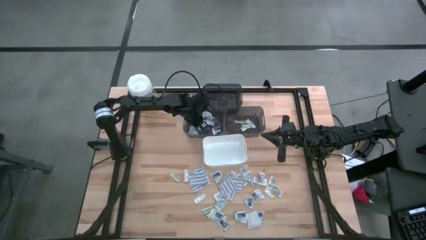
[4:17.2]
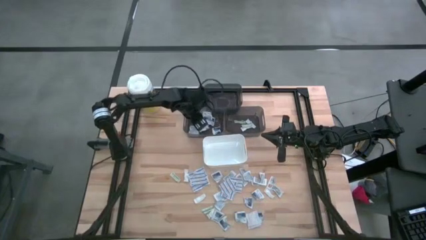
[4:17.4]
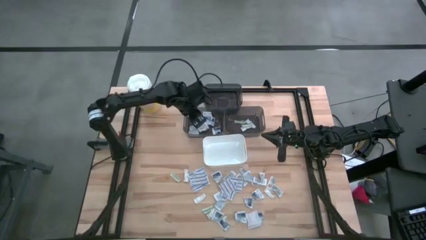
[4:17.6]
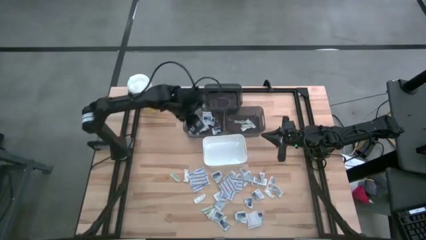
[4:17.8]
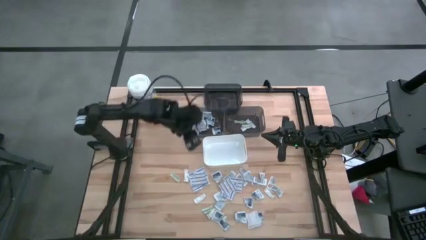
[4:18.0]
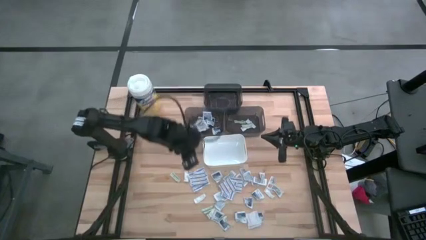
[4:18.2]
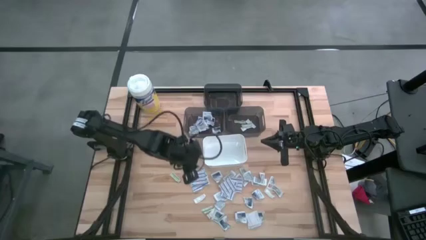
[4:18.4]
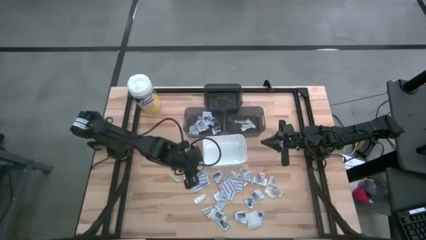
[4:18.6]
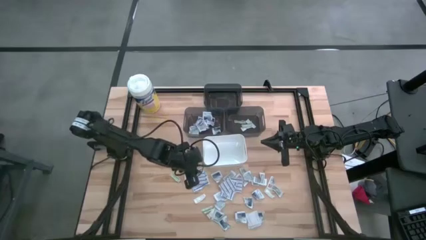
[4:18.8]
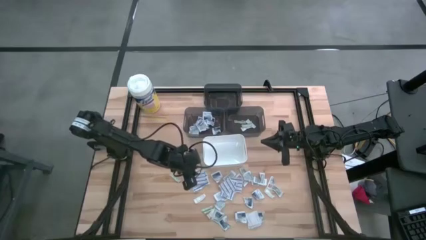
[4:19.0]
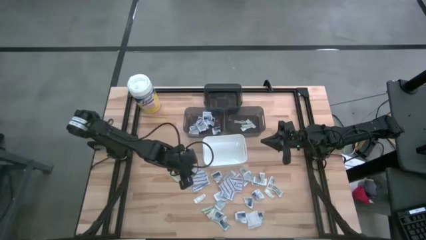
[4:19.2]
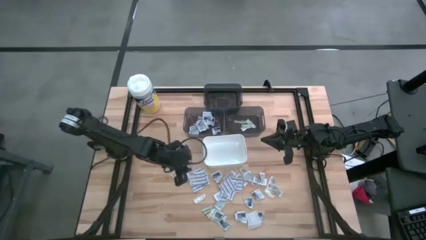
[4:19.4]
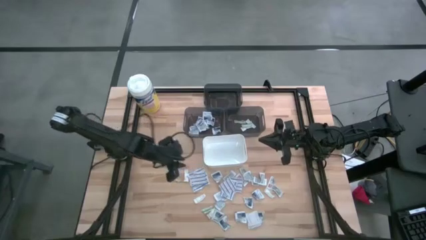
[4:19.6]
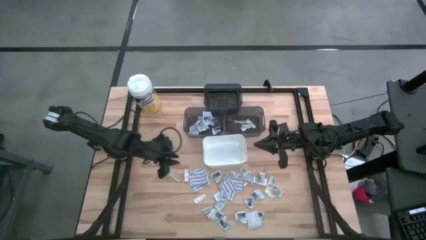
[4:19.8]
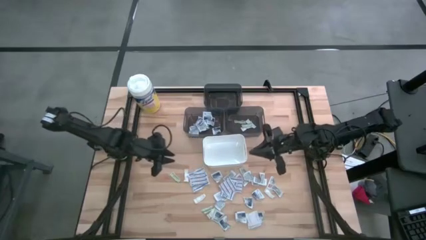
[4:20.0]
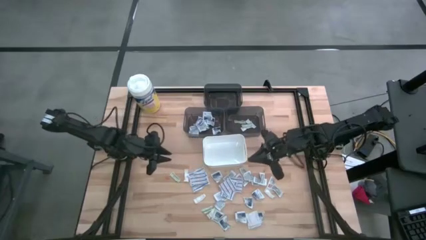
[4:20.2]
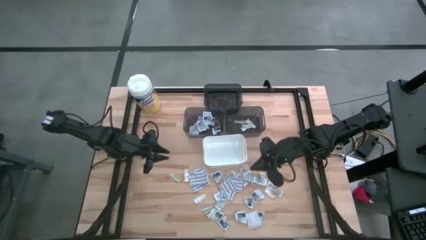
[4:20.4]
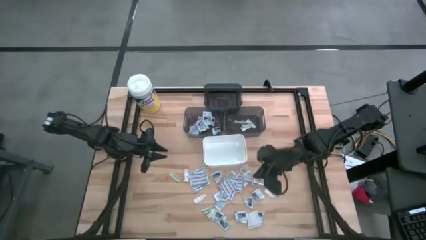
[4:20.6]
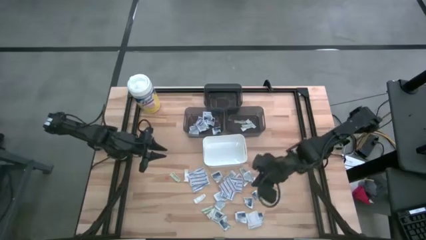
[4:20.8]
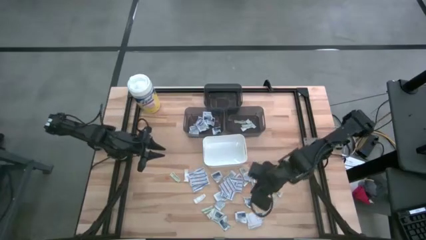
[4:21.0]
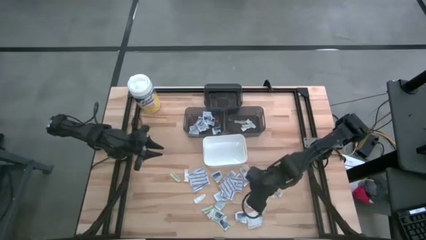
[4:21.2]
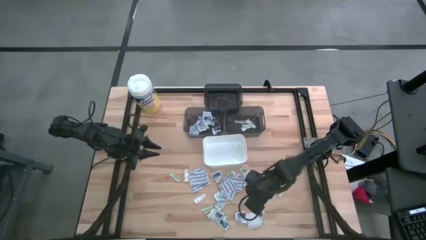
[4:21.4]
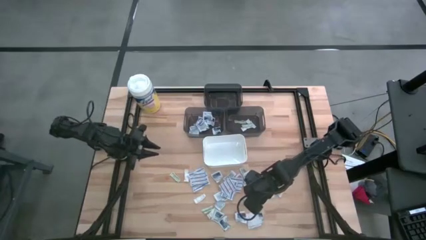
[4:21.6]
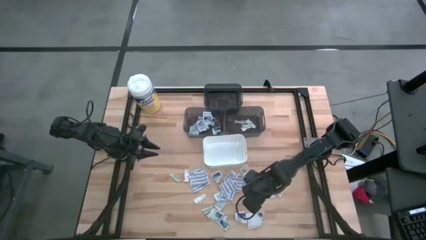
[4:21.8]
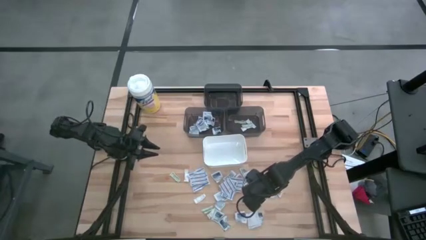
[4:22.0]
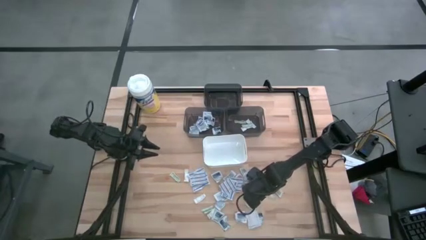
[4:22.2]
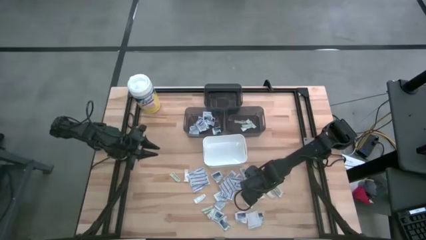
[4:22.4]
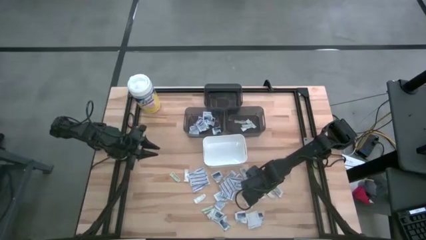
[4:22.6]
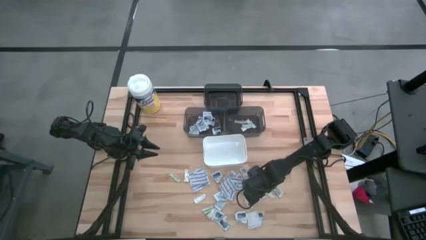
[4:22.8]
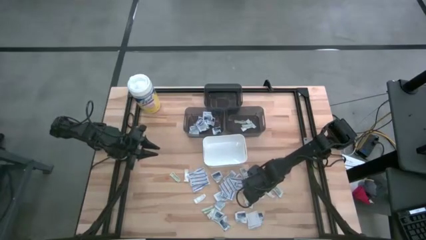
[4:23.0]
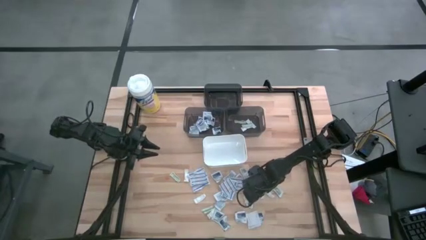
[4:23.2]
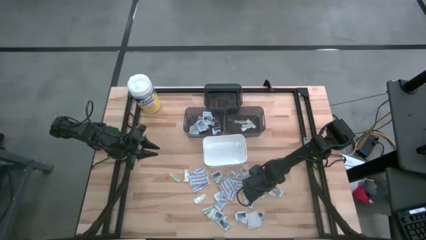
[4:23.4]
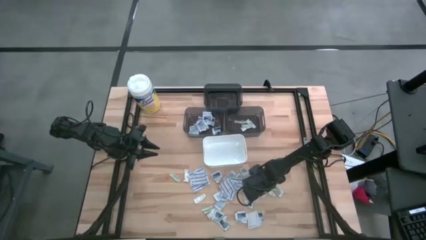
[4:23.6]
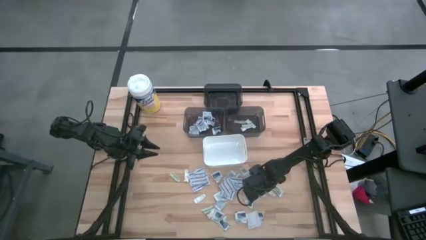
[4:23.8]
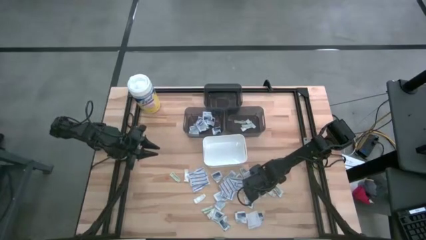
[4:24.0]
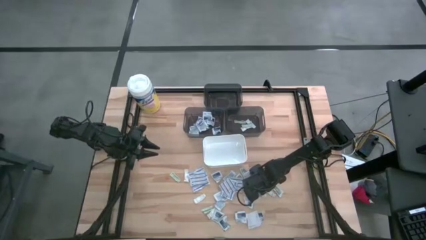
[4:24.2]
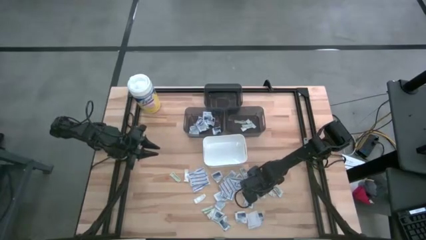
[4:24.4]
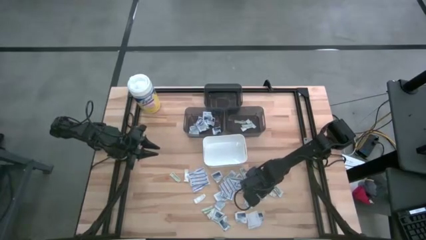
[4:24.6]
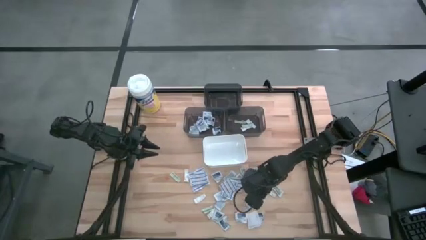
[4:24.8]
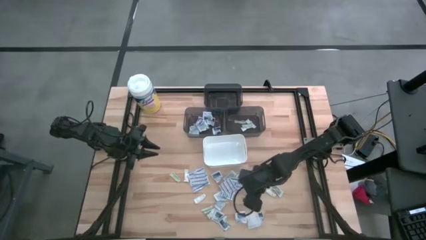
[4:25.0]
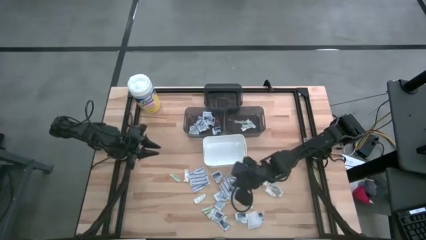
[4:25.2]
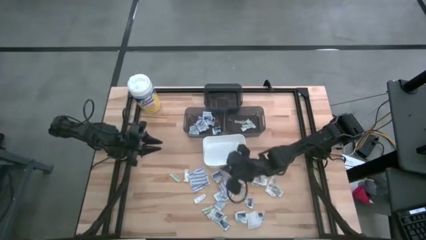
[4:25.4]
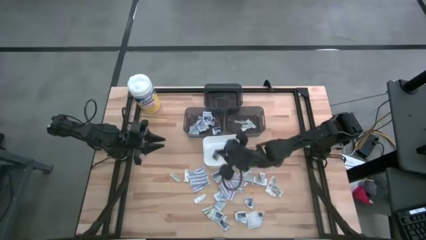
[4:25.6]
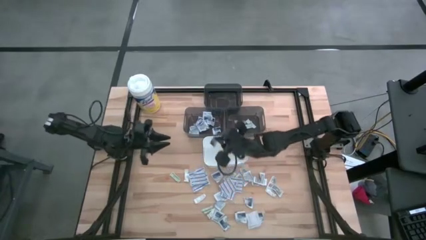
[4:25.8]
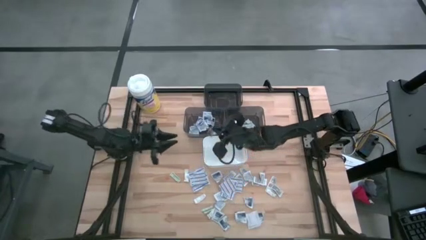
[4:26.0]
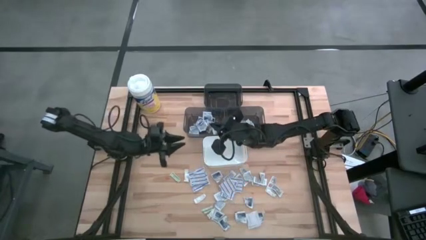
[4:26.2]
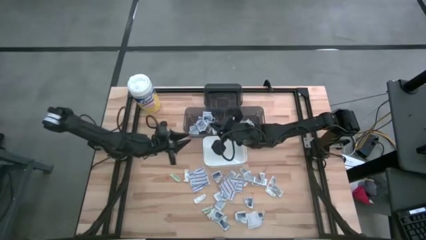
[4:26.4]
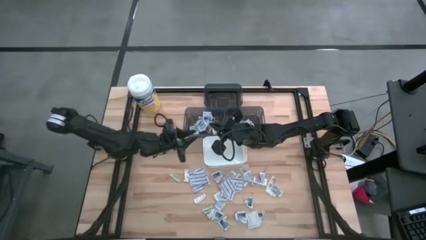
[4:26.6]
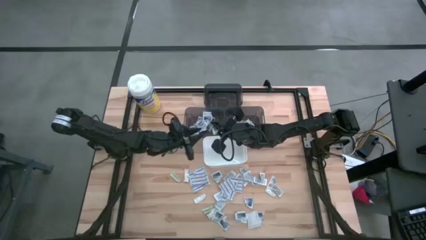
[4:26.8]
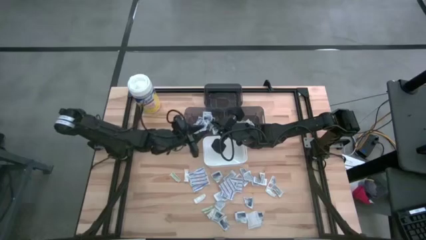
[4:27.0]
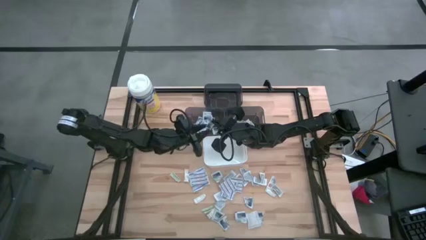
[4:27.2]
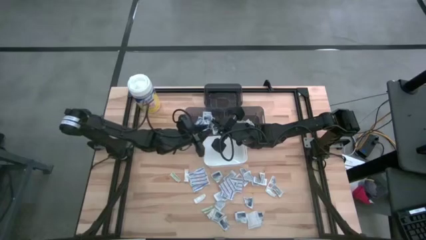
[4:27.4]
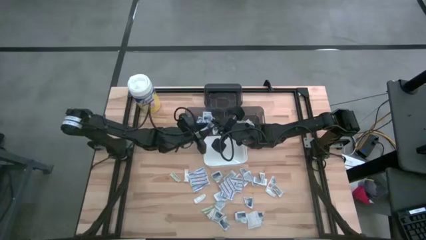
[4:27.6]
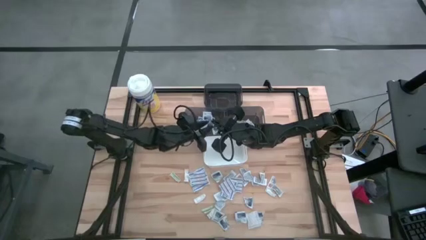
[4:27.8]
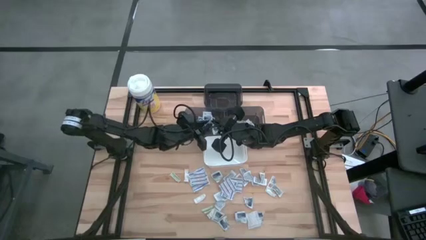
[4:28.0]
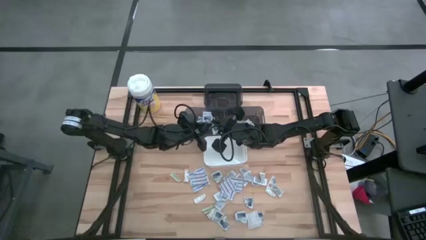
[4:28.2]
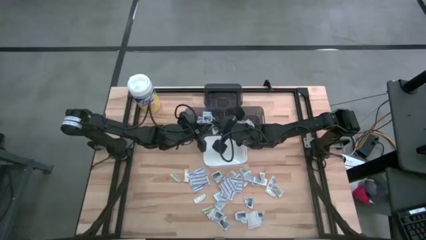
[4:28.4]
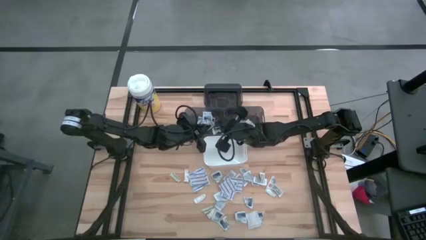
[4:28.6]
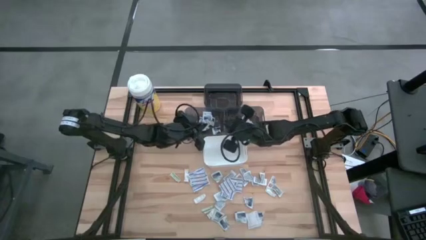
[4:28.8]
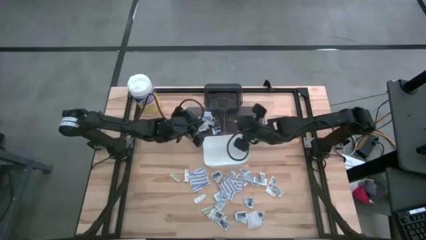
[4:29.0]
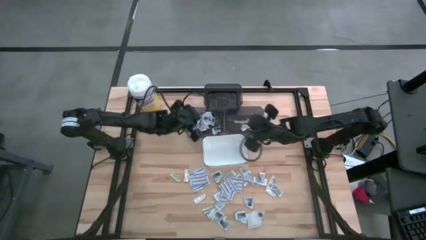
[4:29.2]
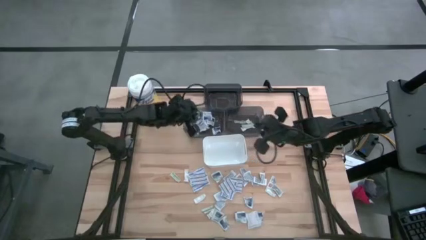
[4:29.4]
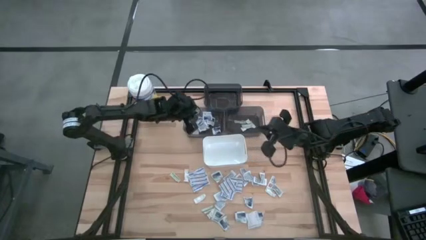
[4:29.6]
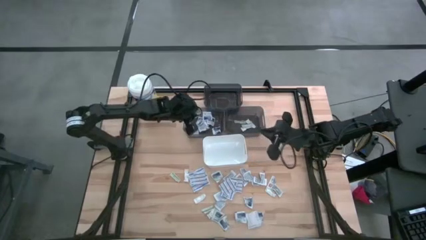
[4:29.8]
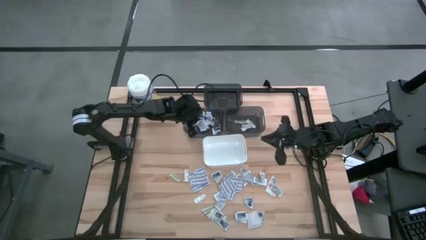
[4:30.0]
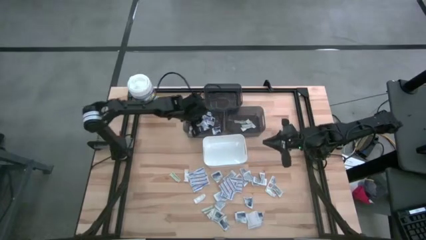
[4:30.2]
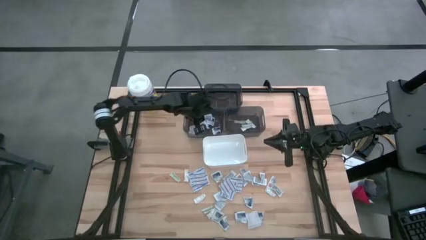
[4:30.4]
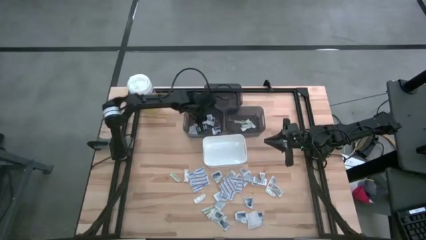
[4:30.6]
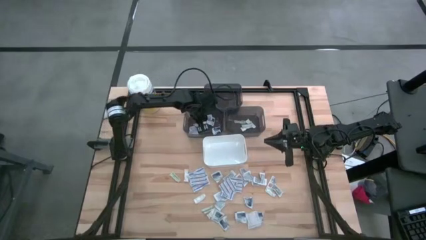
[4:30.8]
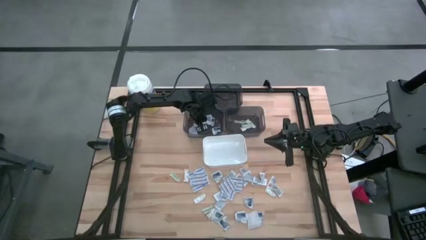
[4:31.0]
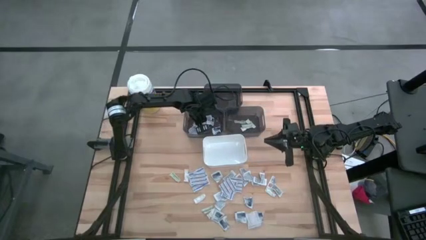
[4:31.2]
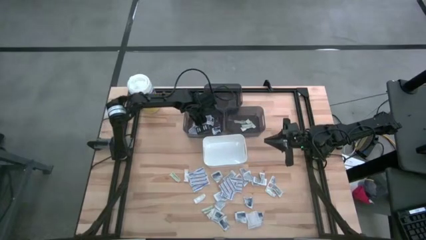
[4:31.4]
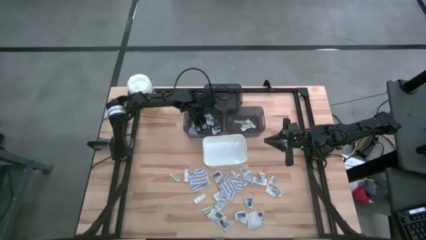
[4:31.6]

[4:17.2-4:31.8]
Task: Pick & Place First Aid Supplies
Put the alcohol pad into the bottom left black bin
